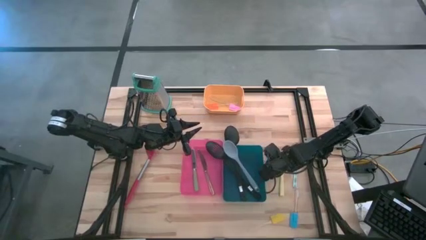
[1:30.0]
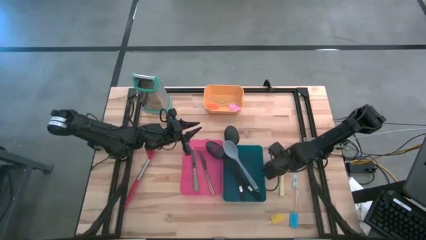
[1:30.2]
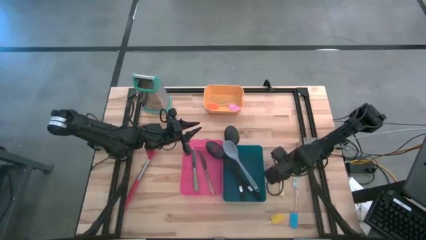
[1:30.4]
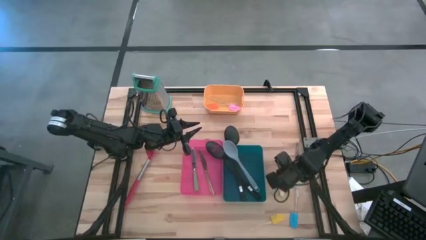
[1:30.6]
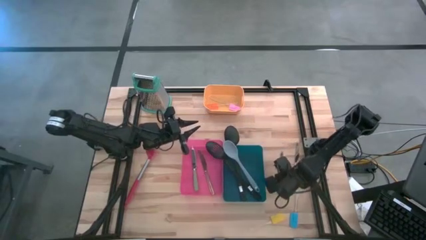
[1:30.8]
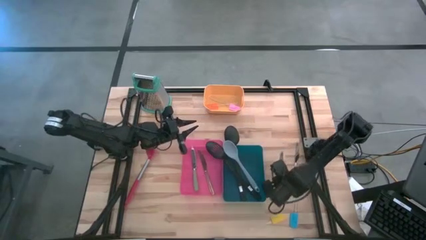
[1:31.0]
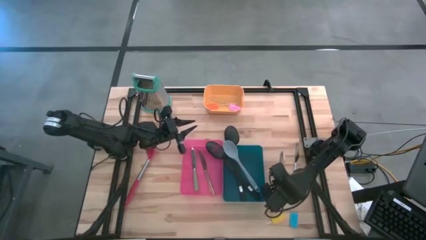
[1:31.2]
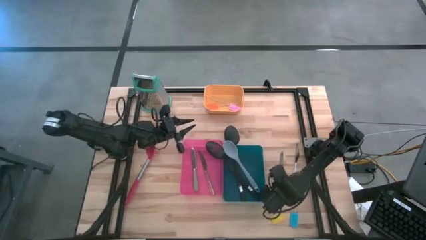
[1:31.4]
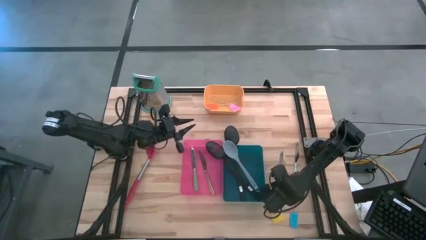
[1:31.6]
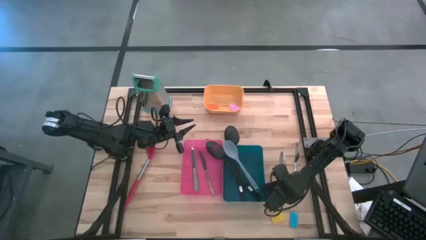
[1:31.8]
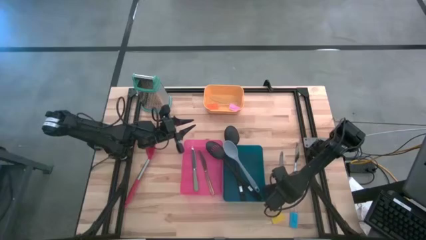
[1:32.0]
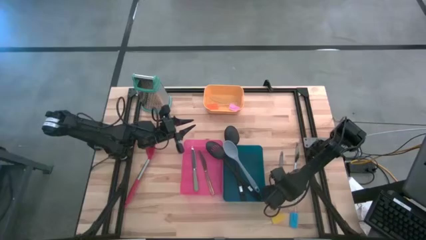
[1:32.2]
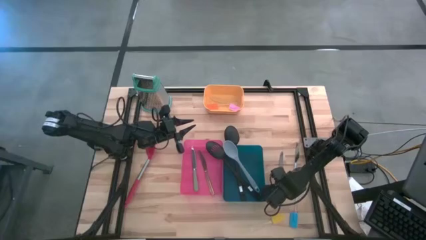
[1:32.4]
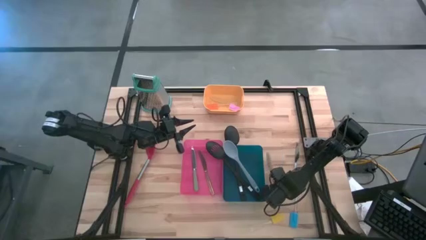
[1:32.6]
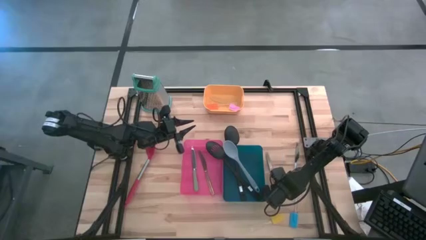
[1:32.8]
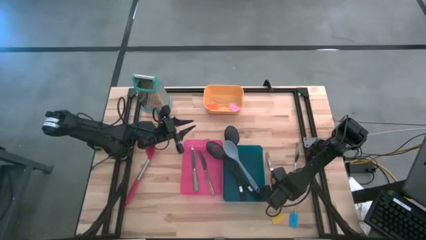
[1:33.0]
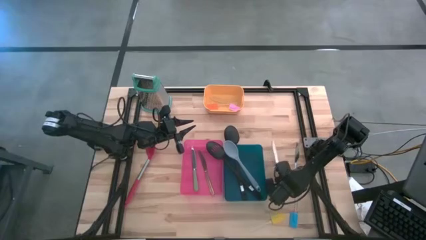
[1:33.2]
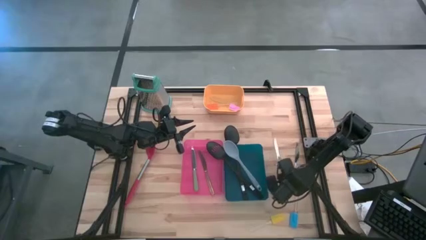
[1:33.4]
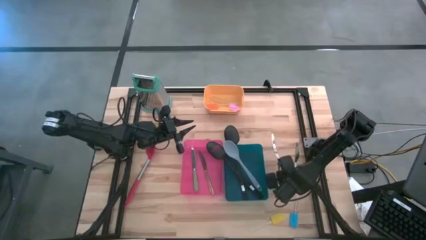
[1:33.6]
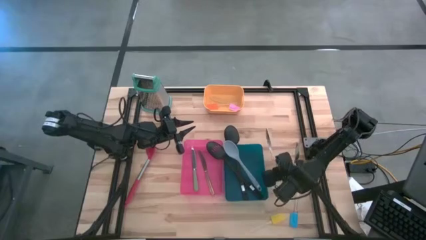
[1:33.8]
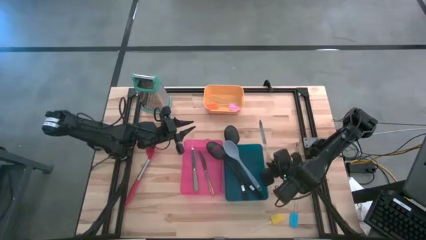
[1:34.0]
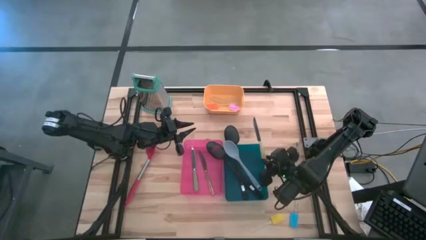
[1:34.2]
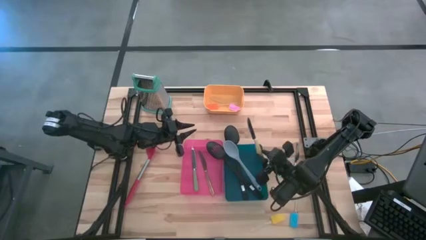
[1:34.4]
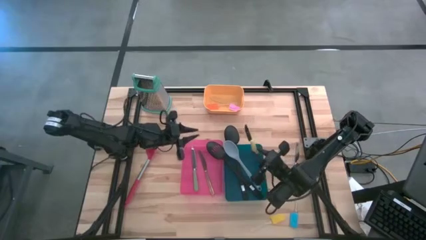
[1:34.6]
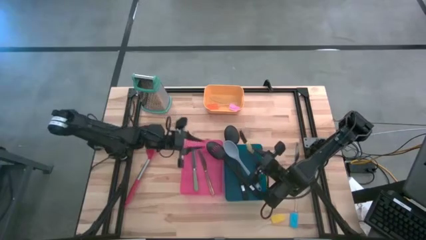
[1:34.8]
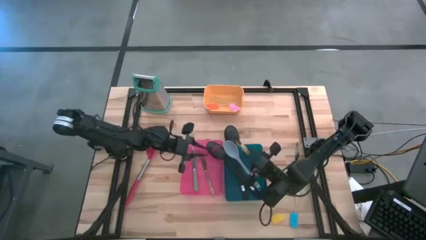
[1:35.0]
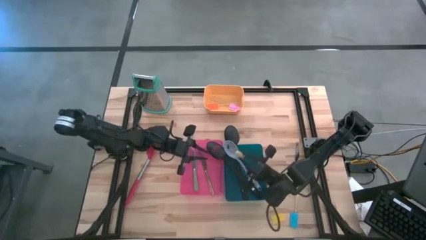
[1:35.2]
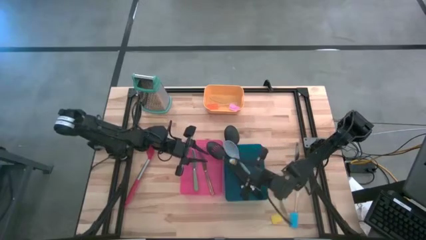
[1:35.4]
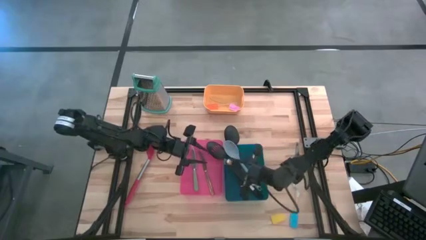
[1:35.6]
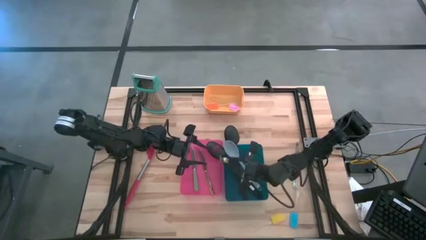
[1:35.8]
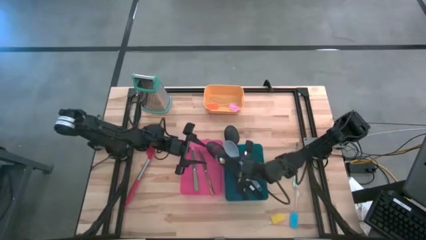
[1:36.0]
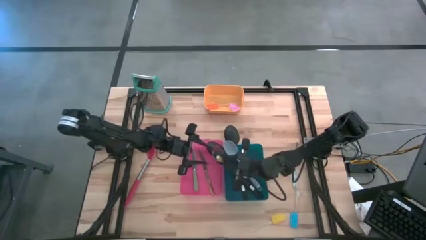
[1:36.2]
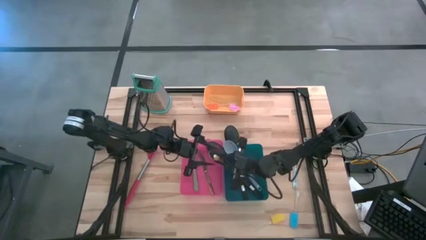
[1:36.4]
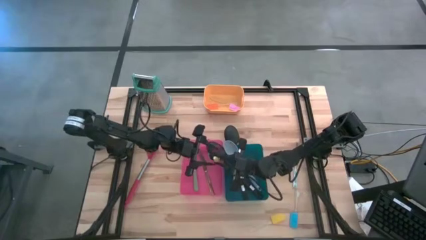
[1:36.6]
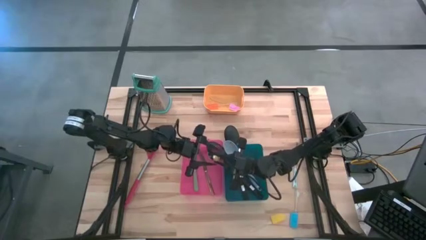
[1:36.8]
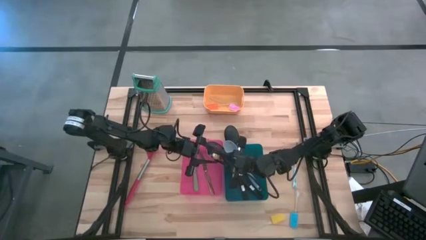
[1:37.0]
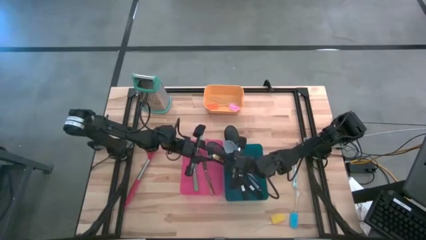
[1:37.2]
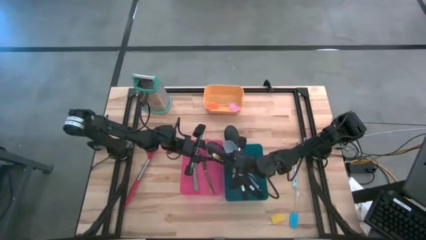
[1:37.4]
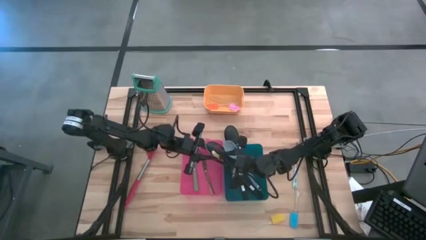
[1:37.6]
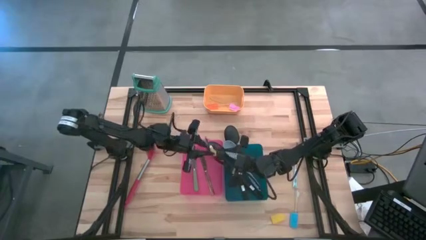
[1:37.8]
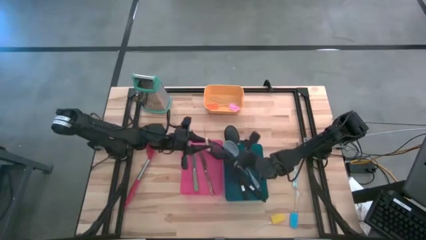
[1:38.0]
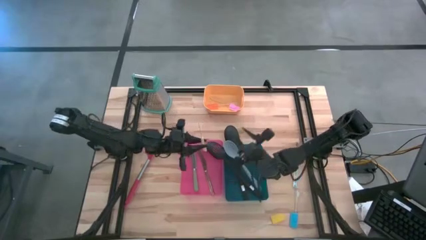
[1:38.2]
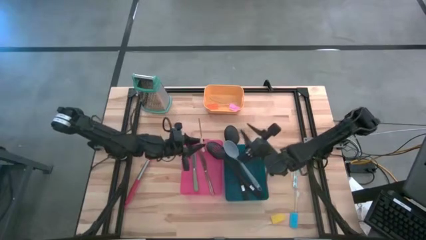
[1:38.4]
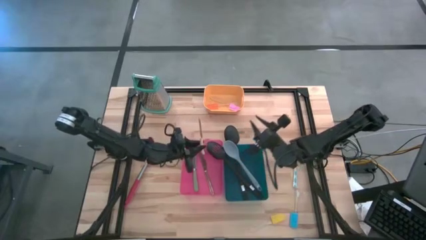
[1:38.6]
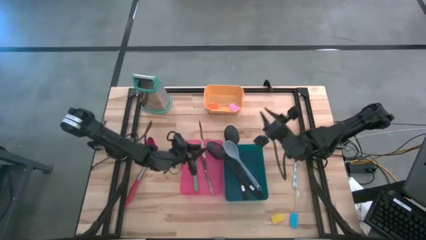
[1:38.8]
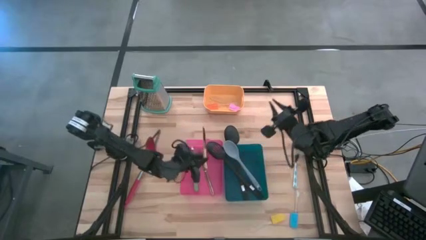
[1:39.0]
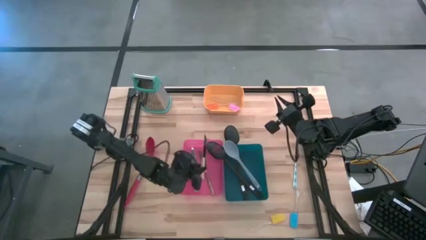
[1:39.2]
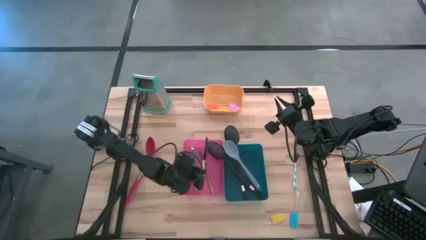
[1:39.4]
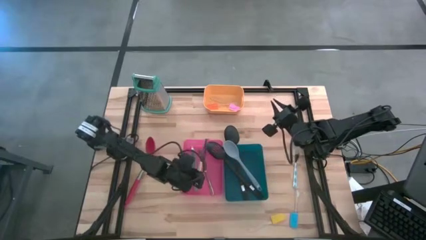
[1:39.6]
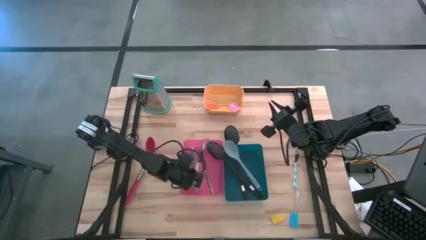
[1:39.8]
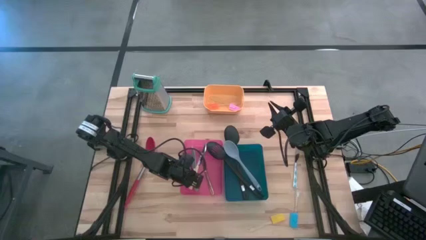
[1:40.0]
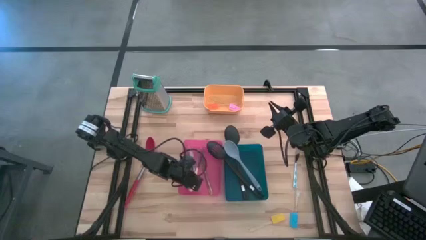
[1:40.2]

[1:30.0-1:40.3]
Task: Pick & Place Kitchen Items
Put the yellow knife into the red bin

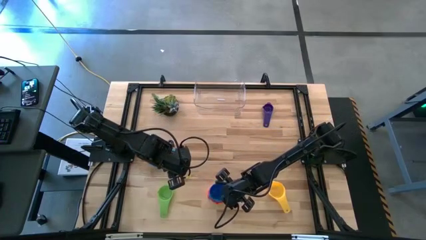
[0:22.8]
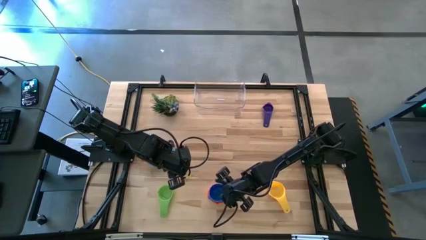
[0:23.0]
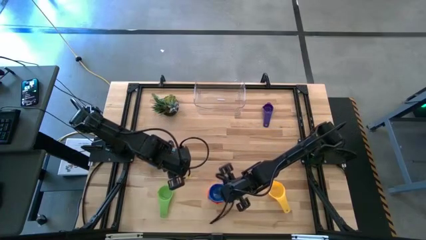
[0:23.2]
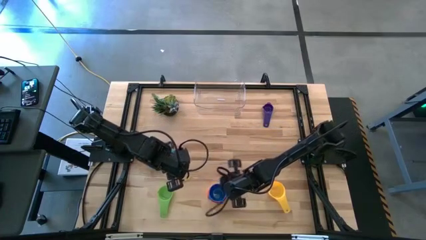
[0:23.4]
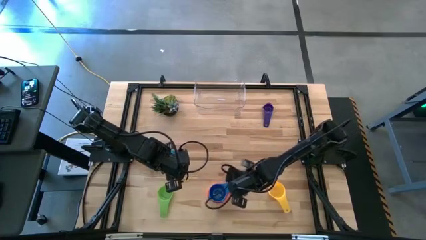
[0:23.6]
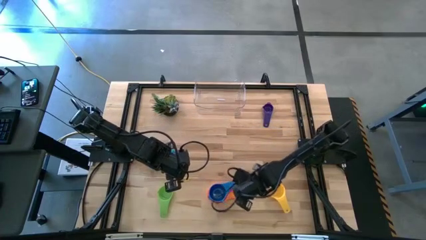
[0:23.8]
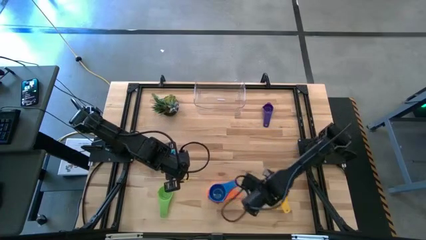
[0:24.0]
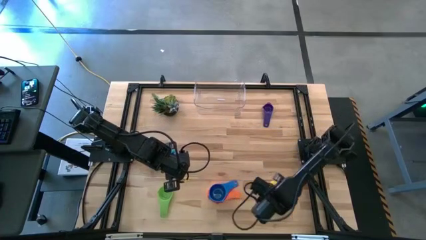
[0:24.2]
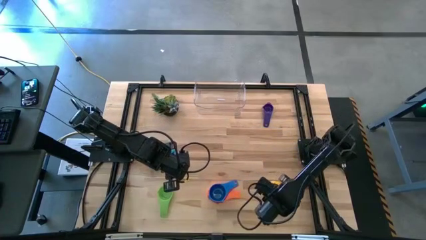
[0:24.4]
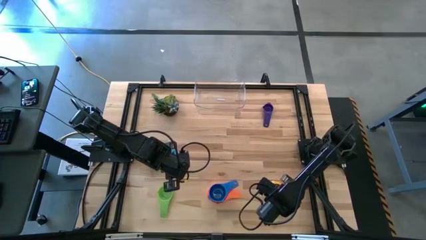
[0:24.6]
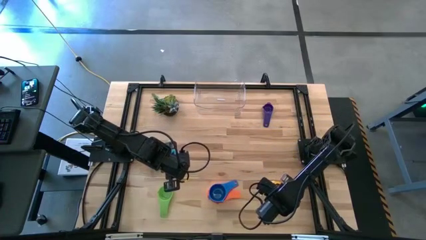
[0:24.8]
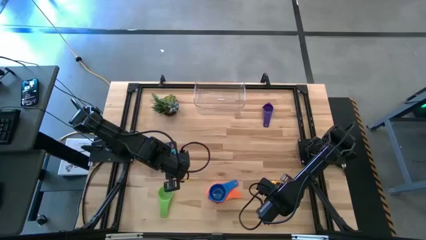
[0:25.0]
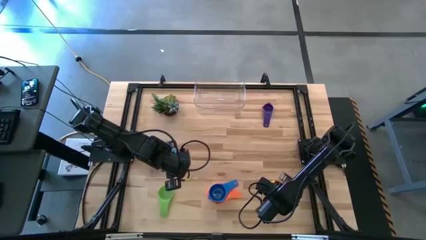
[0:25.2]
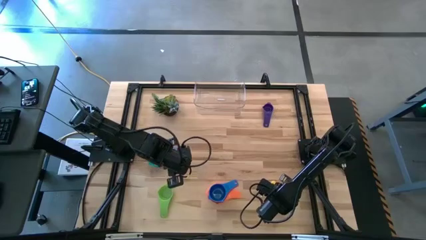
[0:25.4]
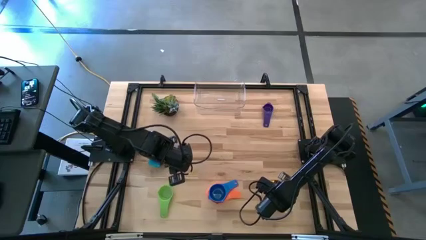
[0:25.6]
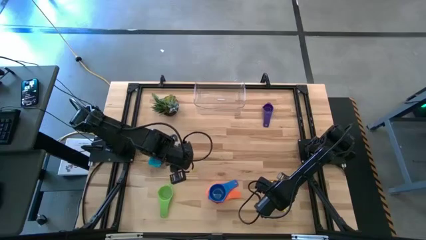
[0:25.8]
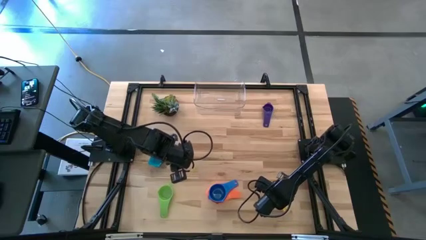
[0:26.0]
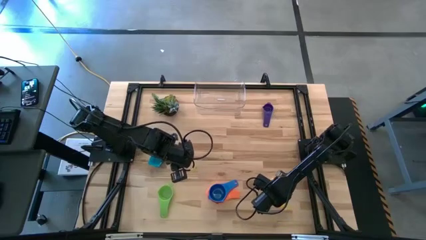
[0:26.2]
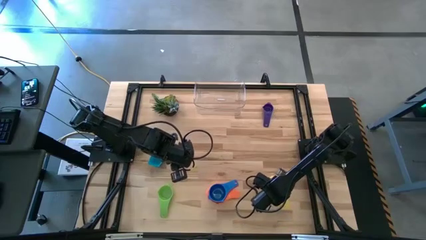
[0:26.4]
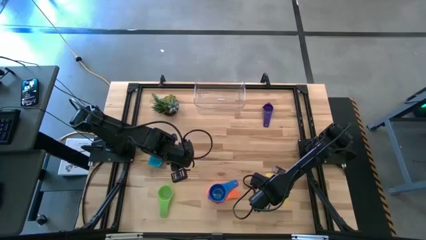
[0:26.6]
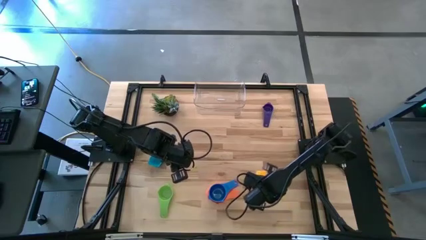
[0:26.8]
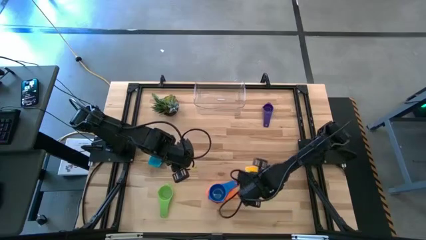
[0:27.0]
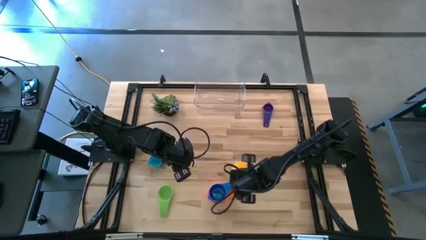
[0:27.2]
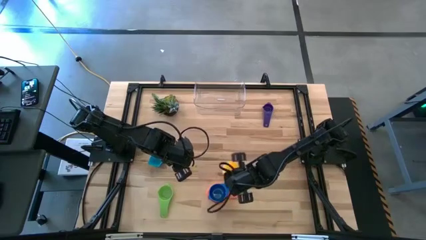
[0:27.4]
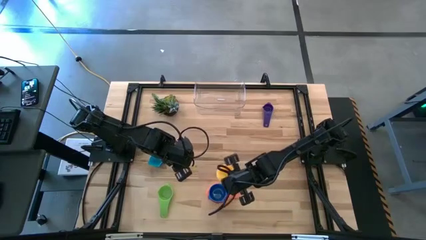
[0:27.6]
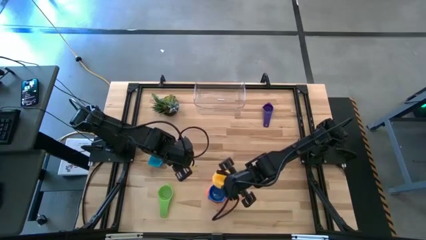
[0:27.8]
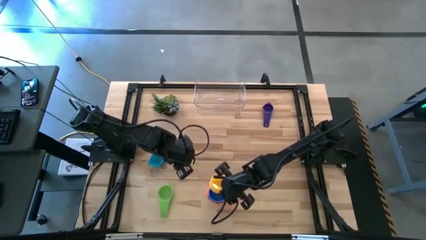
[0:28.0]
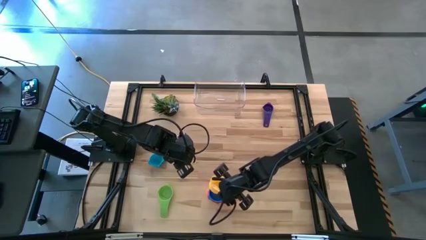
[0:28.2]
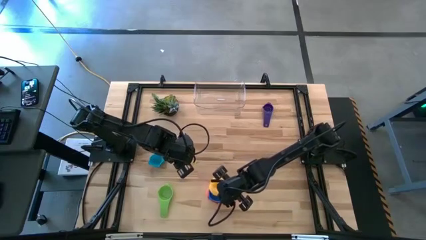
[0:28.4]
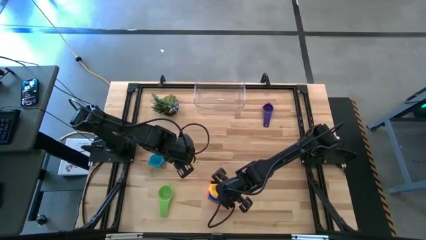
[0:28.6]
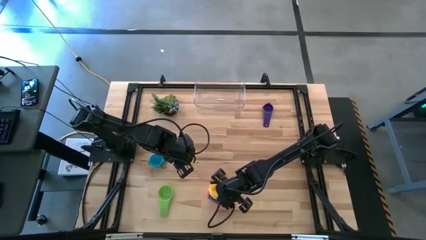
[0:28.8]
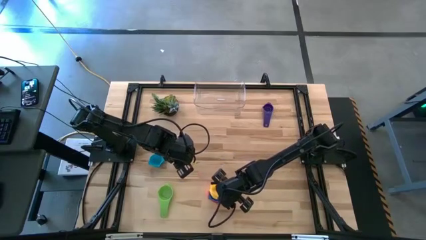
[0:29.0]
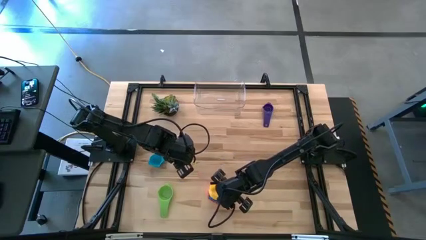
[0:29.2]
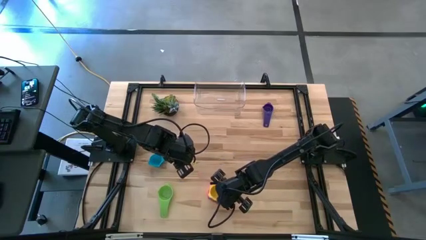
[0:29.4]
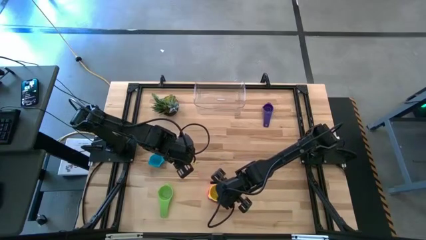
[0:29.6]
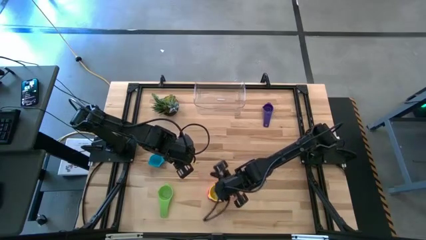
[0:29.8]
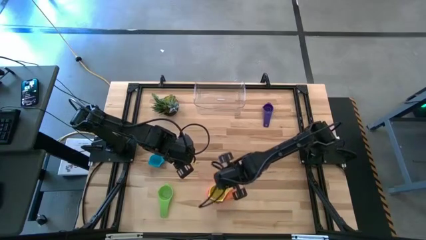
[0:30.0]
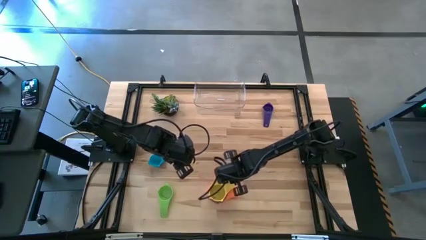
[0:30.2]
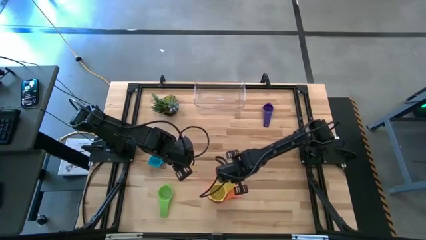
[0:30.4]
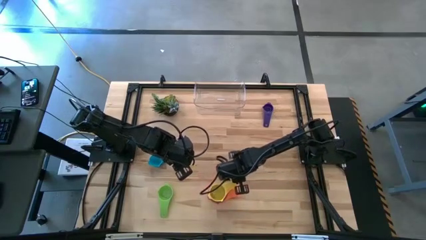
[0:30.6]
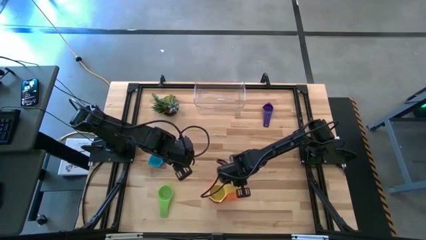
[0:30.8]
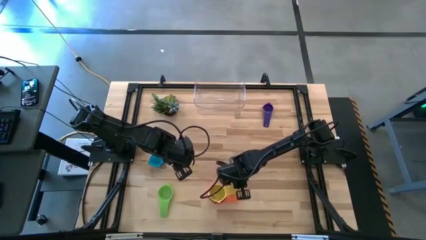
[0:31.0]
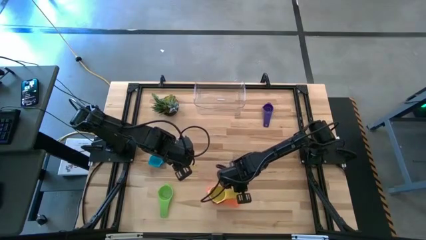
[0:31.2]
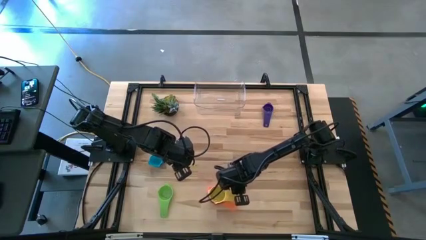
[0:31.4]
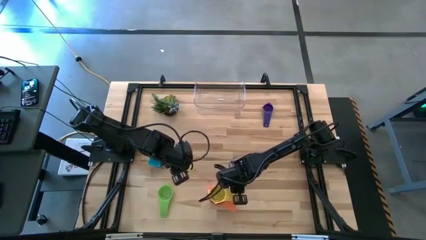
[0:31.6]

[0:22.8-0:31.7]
Task: Nest measuring cups in basket
Stack the yellow measuring cup on the blue measuring cup
